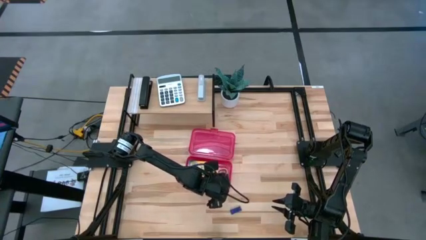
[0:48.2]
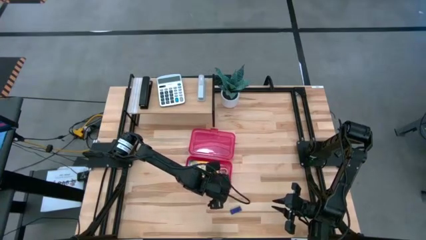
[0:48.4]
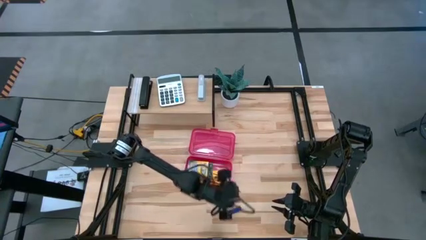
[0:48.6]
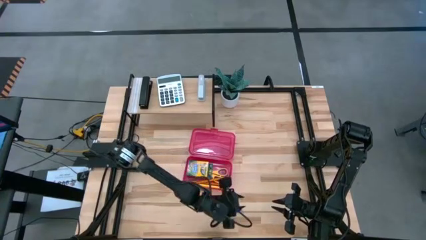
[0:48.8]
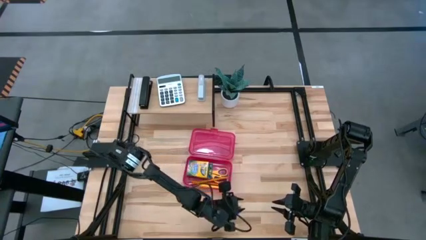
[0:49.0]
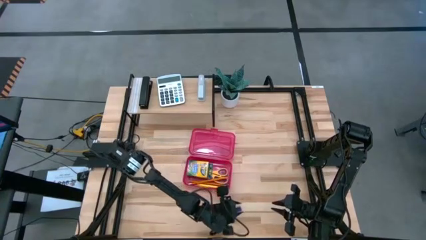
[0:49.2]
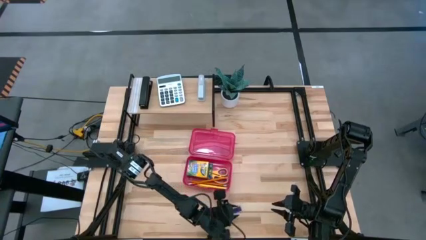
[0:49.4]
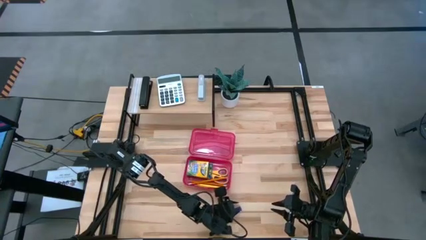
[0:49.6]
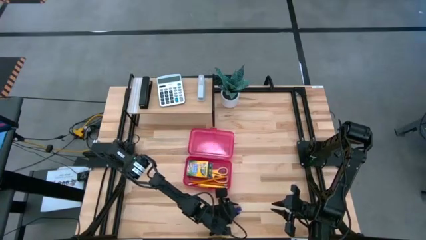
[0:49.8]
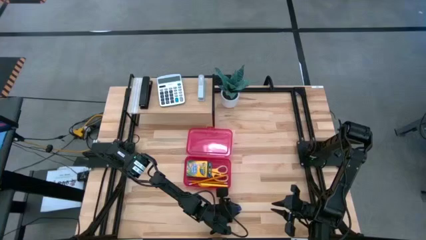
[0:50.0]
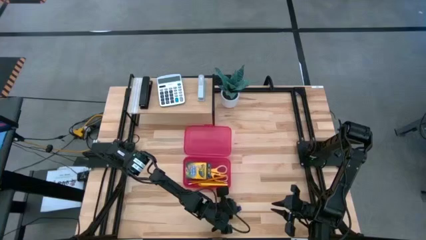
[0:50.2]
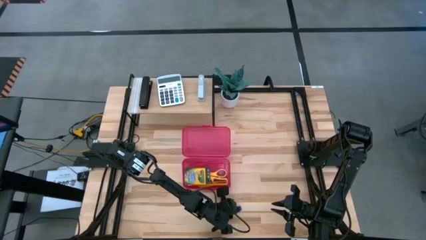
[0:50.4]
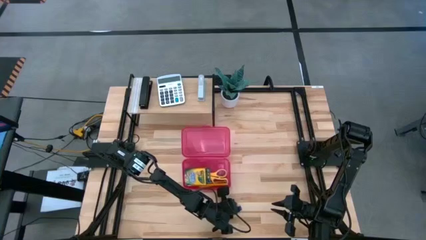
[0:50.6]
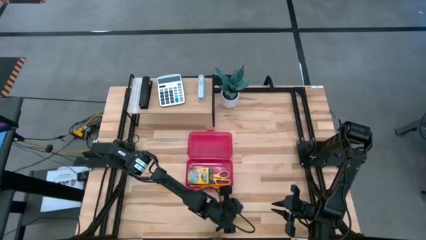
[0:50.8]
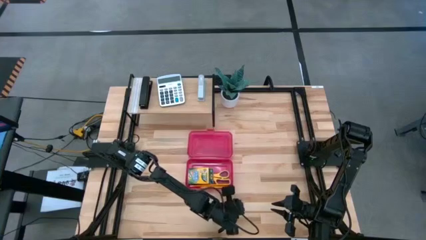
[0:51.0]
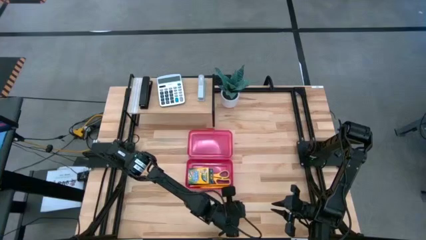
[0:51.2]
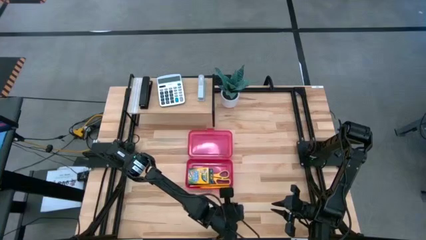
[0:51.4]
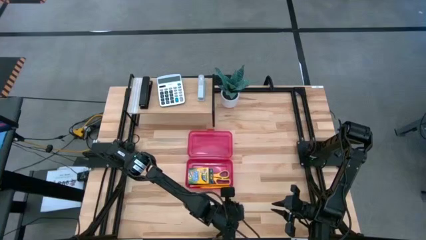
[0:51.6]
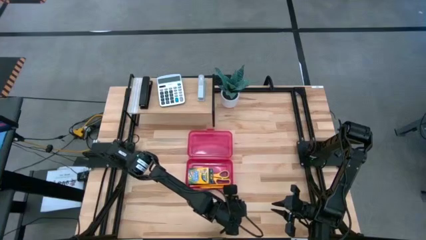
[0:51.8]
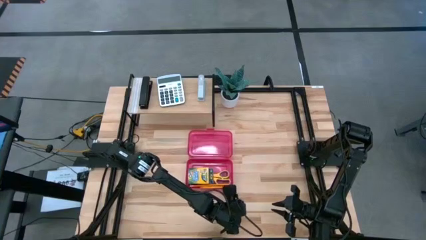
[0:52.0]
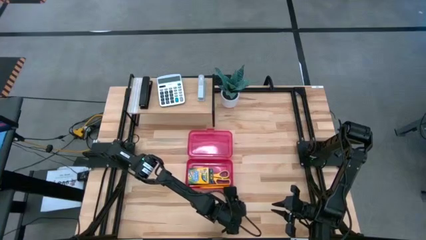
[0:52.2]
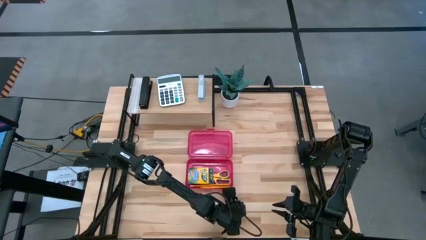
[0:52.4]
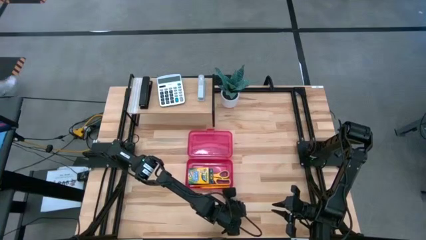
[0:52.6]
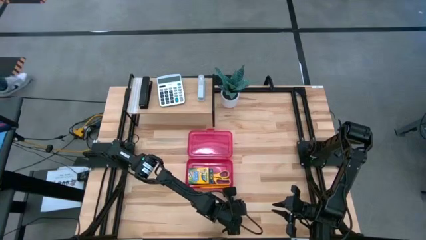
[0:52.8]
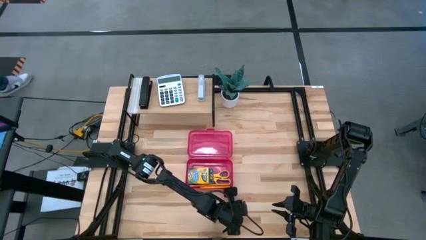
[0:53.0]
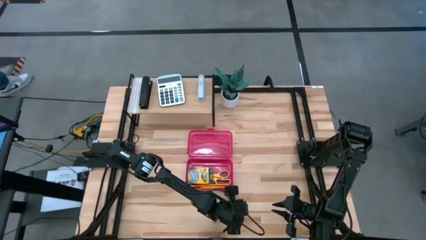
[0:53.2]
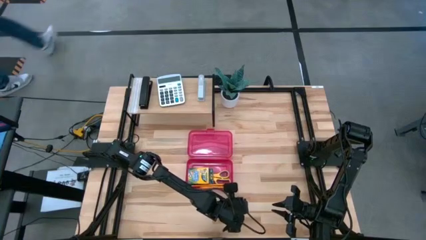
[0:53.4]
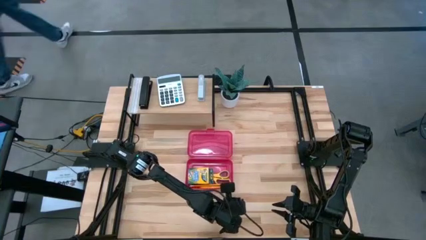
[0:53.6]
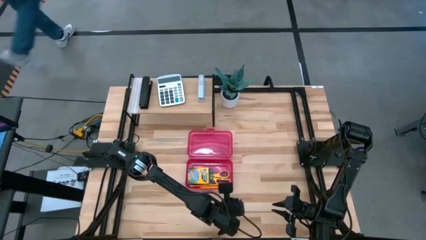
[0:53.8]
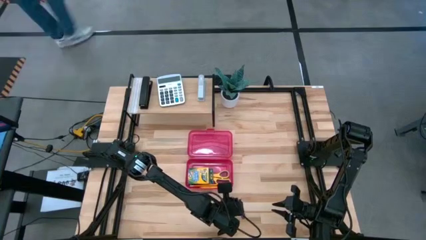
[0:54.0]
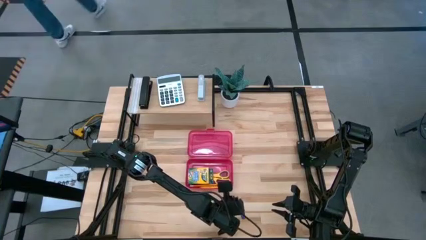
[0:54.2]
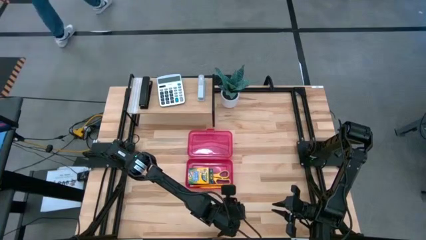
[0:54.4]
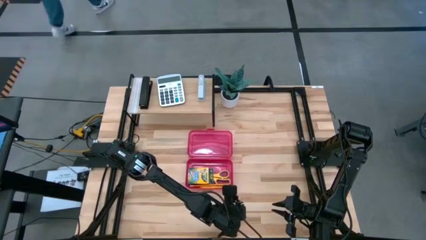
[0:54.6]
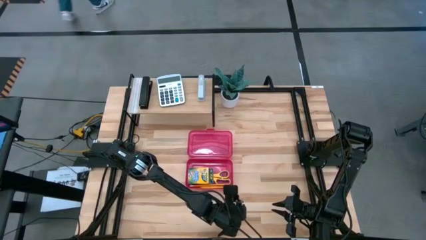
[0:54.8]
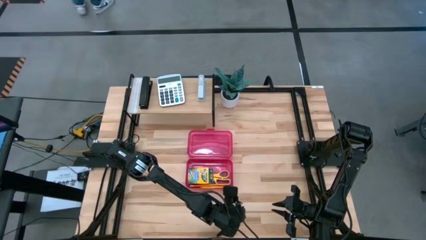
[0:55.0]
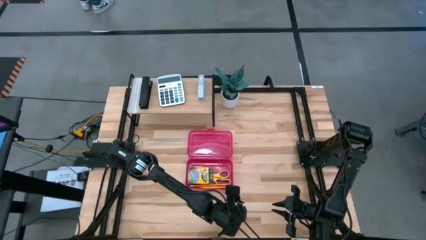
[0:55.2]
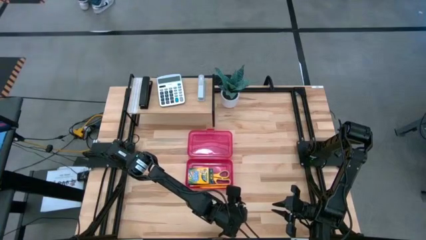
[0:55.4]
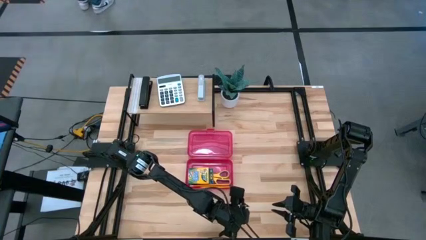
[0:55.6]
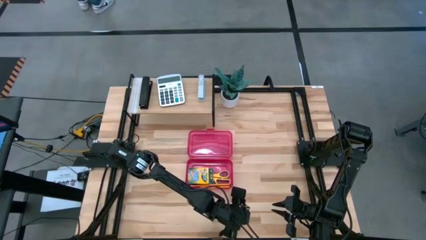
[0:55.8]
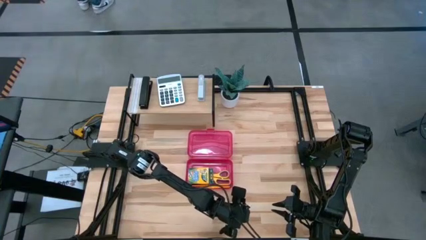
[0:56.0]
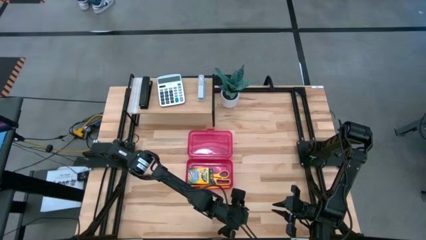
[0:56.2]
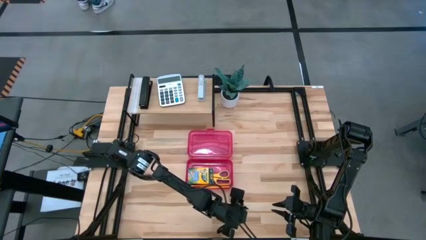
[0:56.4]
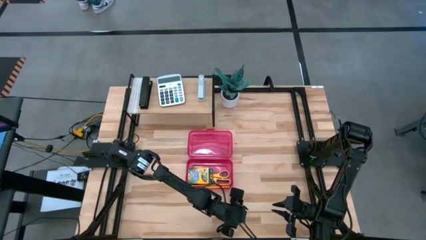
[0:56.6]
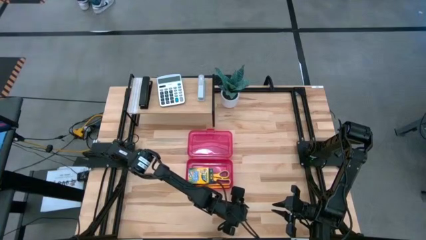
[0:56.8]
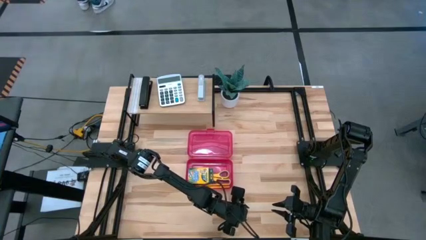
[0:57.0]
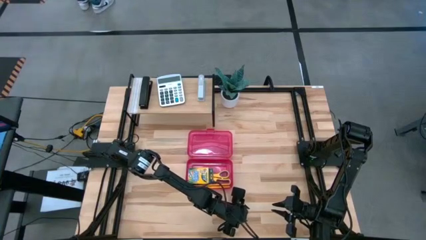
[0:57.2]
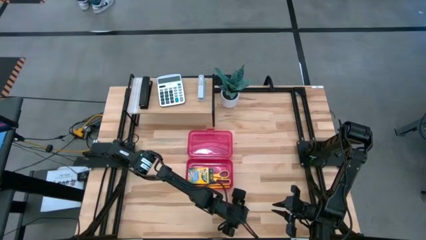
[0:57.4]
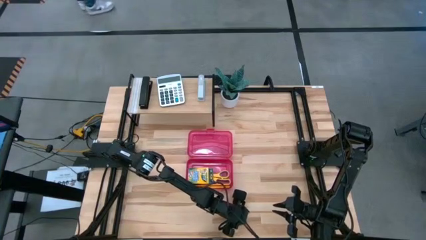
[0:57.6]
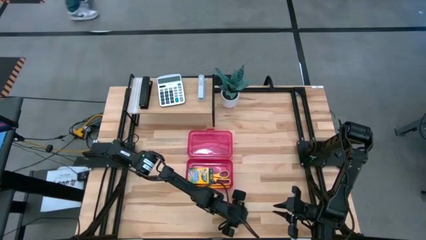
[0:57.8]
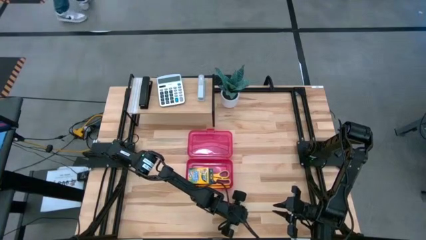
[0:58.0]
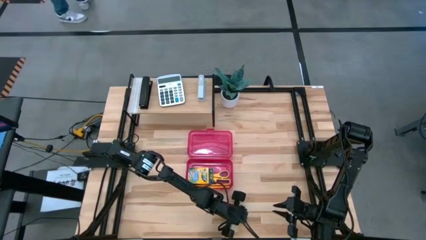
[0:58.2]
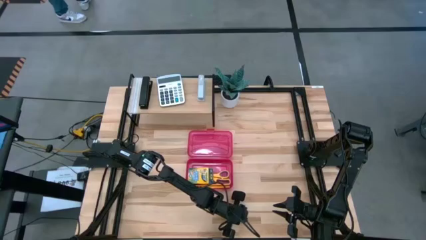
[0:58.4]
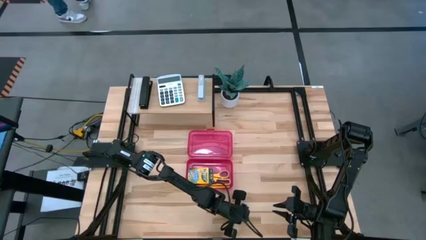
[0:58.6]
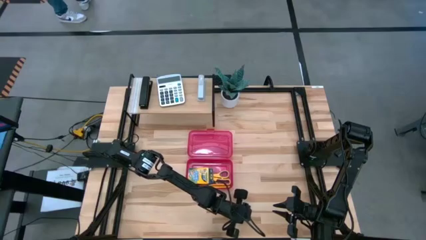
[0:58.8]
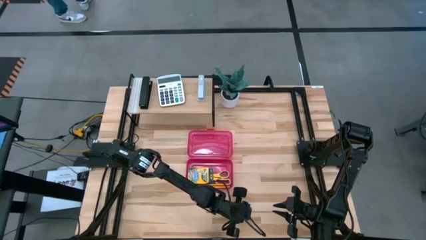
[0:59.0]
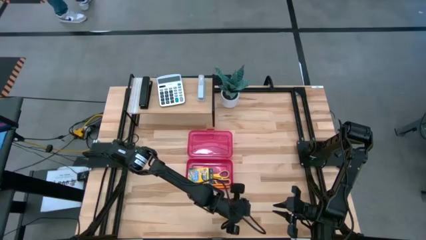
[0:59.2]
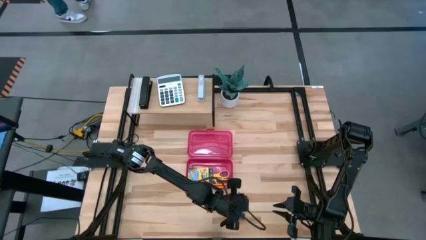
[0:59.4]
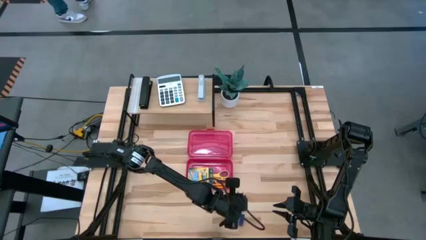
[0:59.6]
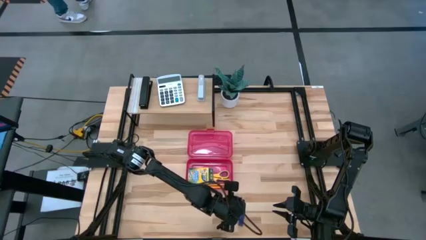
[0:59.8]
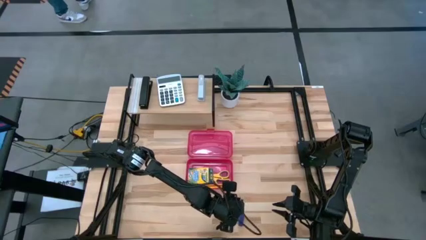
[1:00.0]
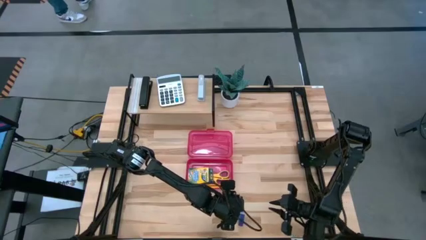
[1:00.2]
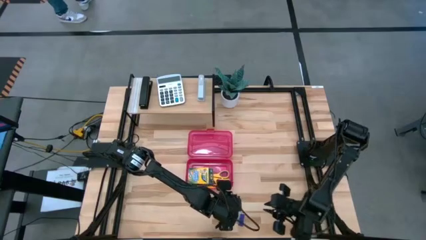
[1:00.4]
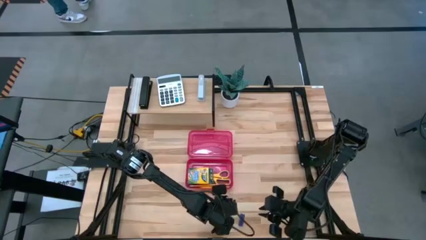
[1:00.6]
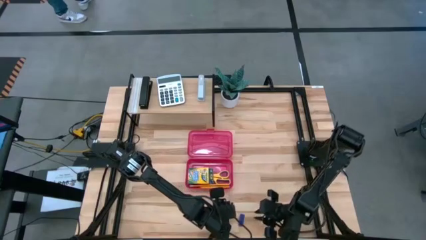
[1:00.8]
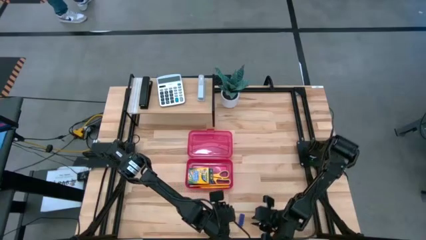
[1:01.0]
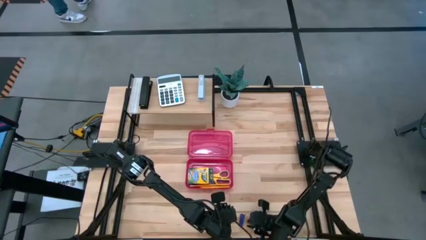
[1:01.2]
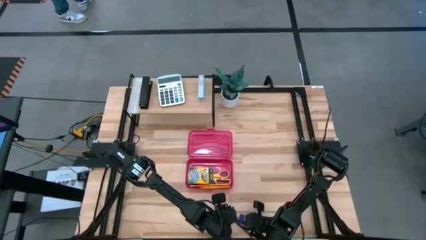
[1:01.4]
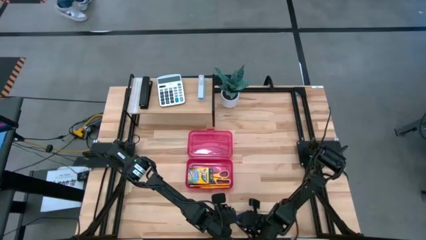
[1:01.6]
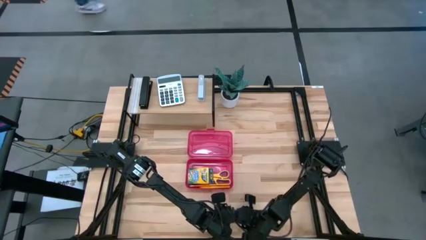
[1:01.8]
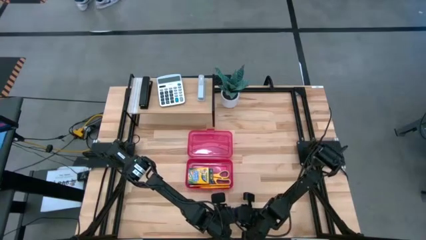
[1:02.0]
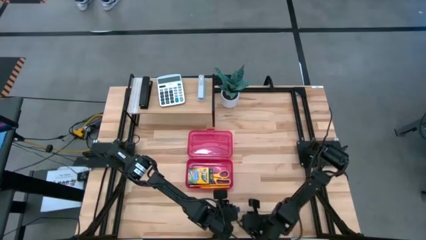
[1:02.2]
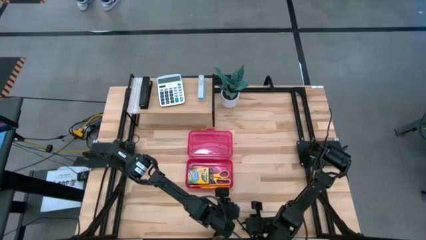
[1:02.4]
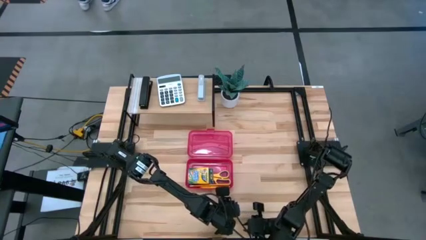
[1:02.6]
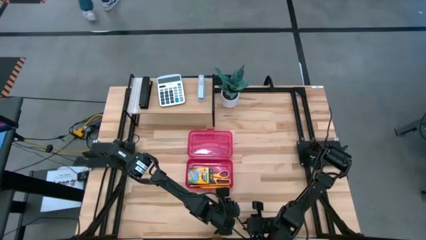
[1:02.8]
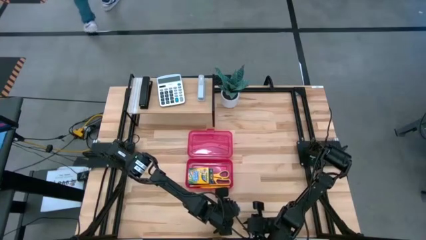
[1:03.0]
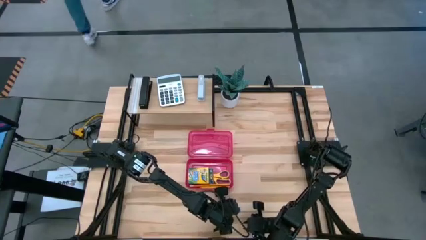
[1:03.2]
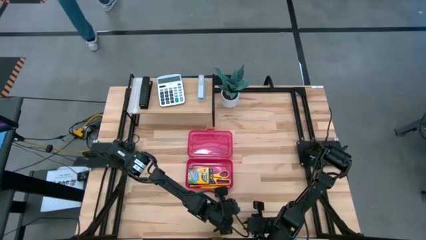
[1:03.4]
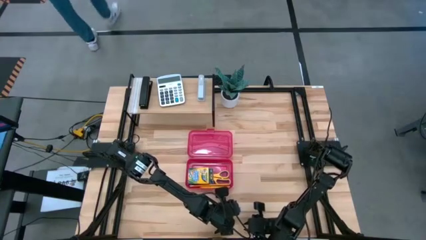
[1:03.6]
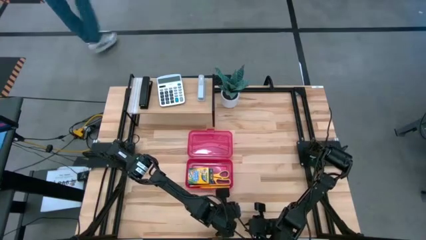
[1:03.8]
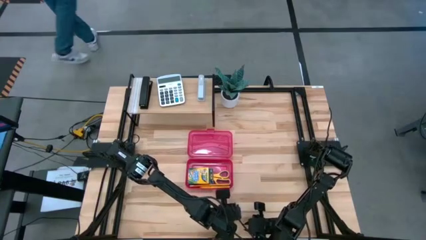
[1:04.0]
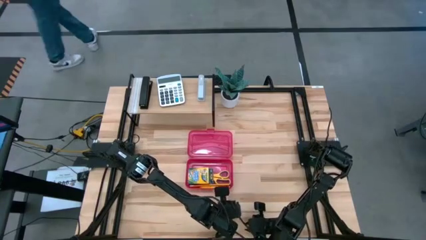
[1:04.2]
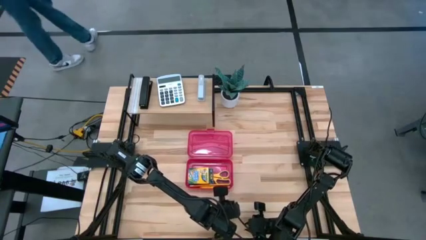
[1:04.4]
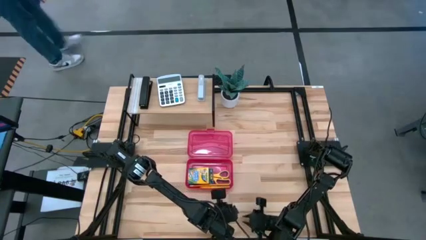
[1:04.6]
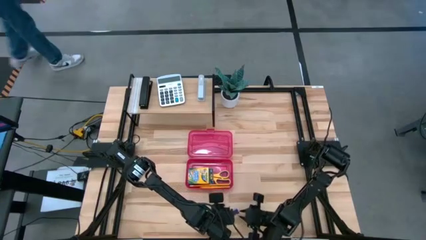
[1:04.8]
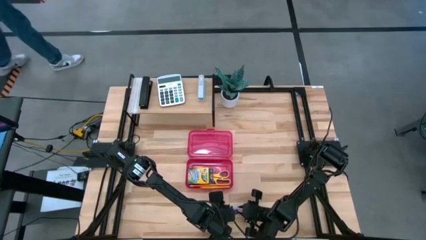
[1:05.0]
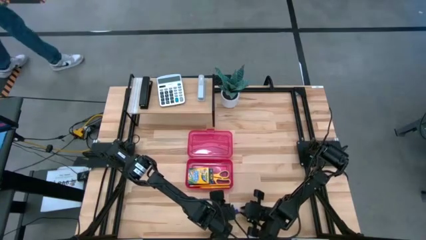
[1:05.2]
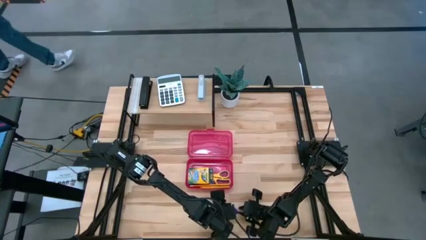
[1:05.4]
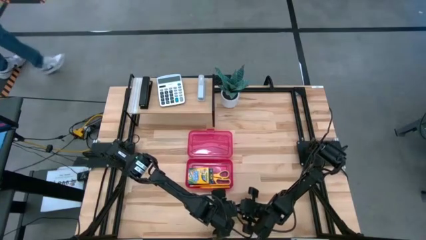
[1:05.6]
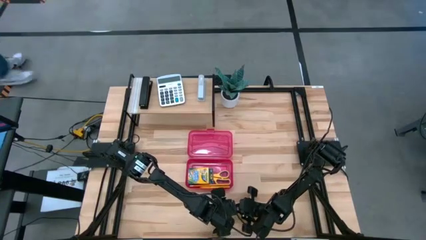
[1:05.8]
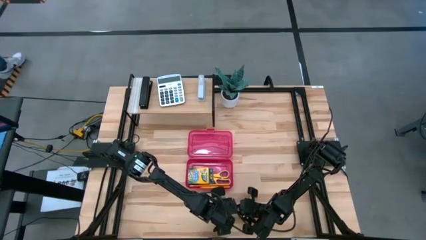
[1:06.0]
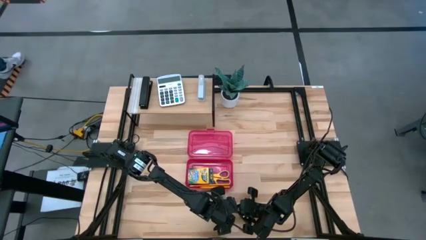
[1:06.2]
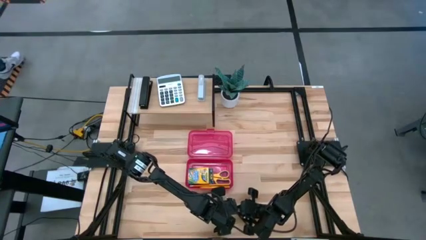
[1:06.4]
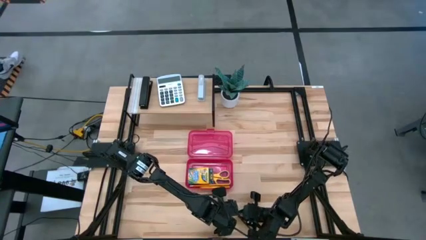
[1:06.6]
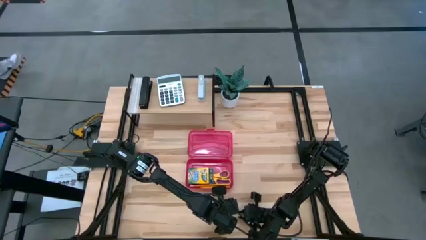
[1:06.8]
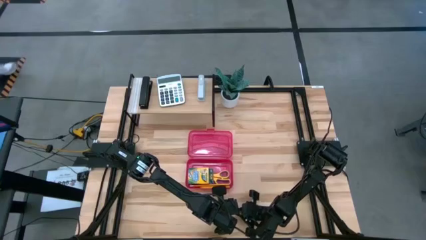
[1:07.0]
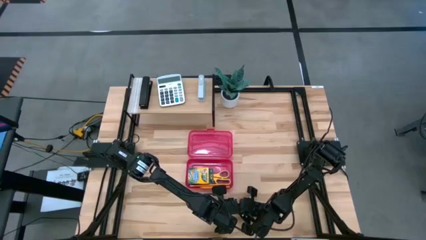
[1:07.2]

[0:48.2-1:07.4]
Task: Pack school essentials
Put the purple eraser into the school red supply box
